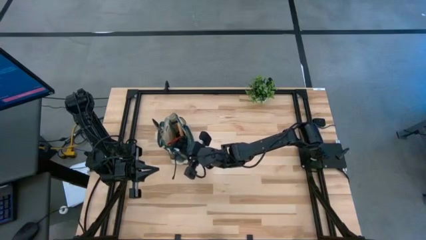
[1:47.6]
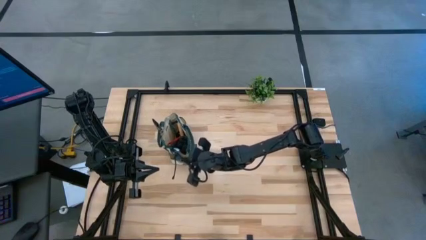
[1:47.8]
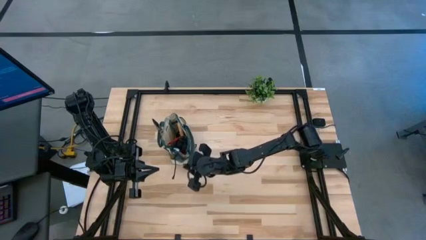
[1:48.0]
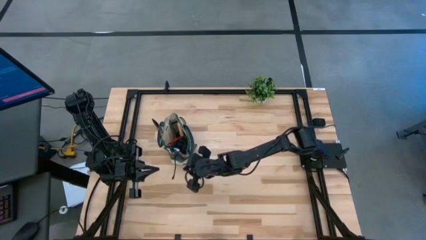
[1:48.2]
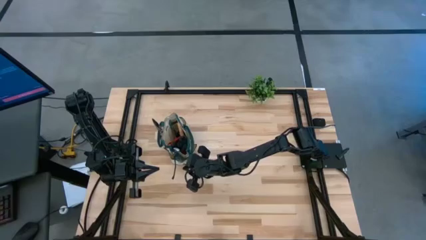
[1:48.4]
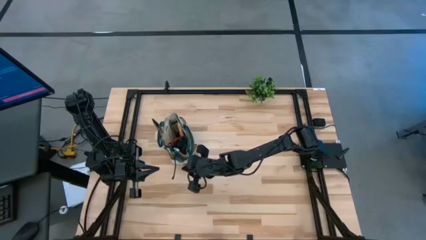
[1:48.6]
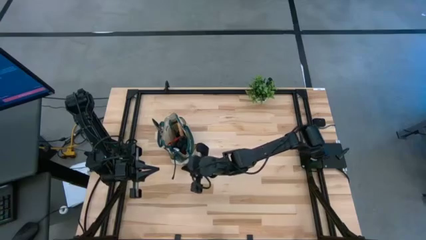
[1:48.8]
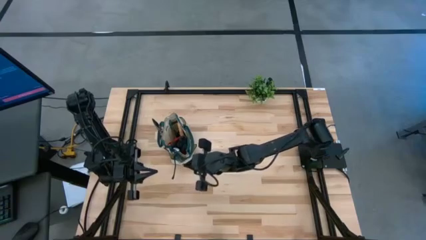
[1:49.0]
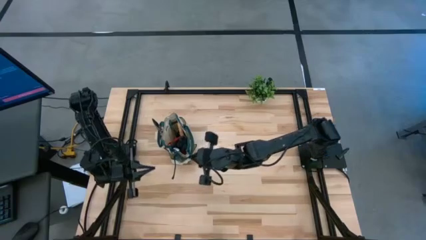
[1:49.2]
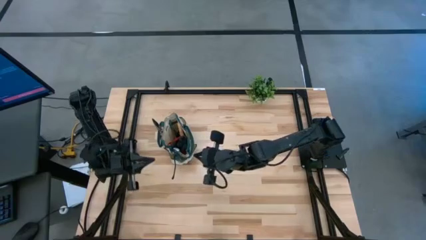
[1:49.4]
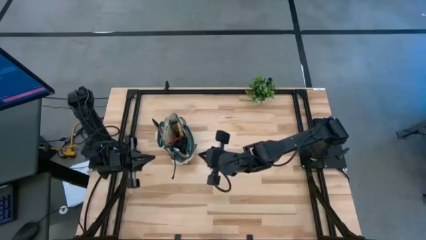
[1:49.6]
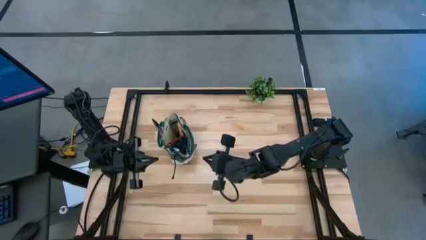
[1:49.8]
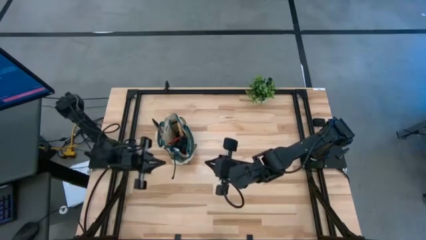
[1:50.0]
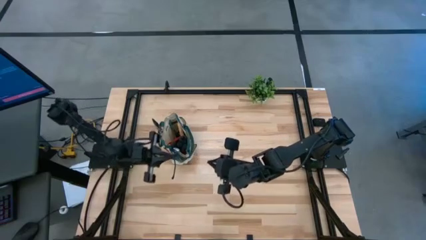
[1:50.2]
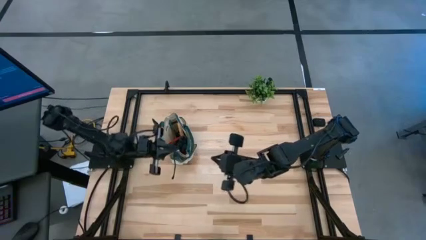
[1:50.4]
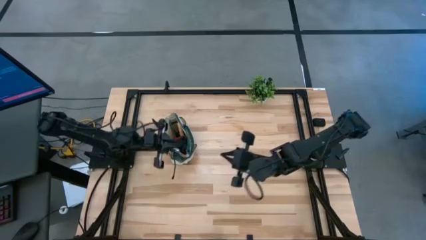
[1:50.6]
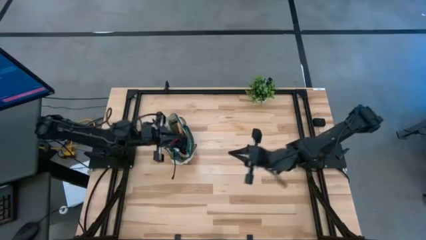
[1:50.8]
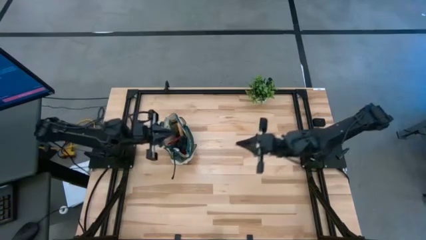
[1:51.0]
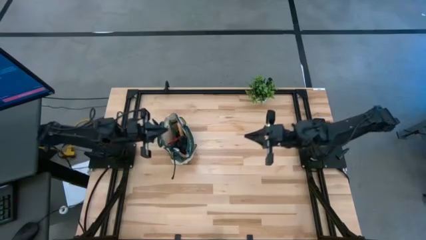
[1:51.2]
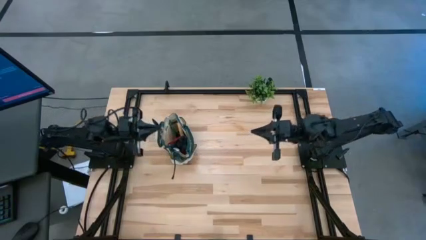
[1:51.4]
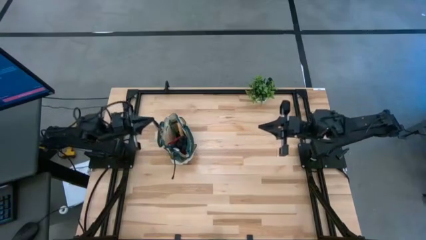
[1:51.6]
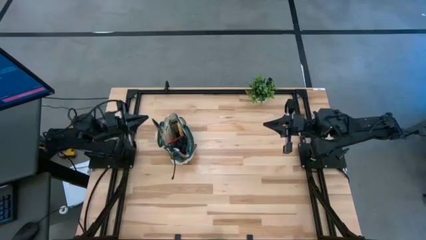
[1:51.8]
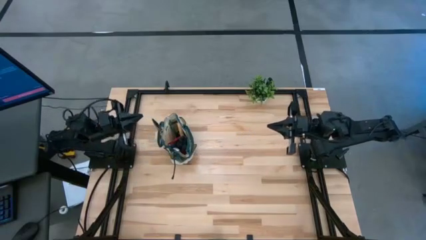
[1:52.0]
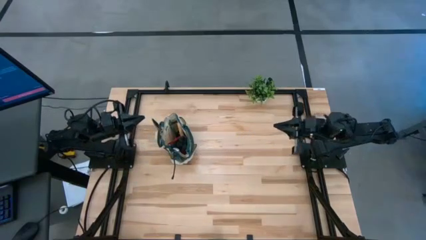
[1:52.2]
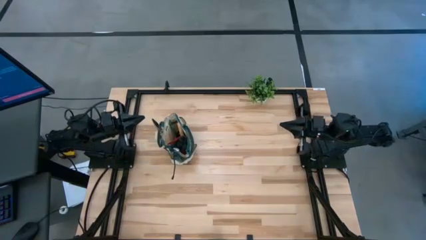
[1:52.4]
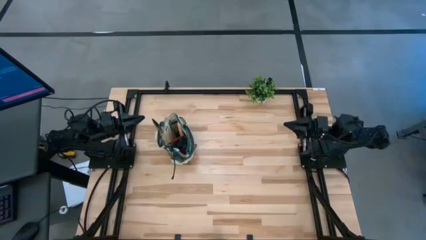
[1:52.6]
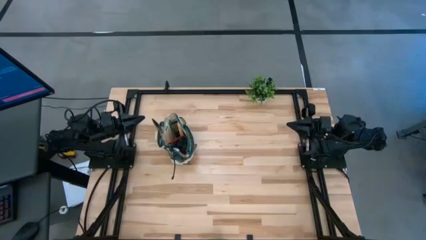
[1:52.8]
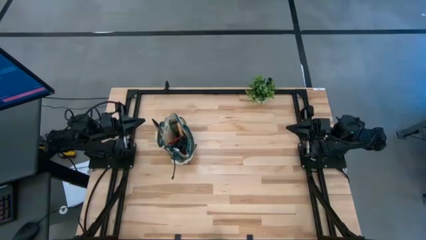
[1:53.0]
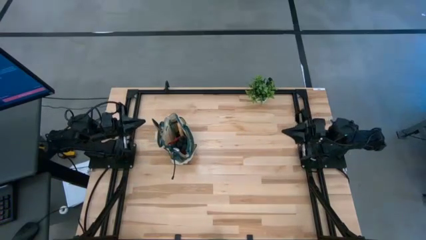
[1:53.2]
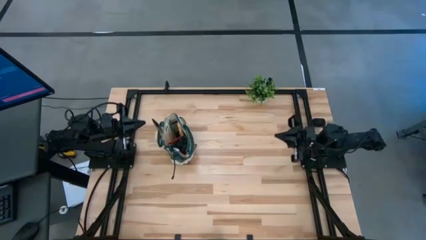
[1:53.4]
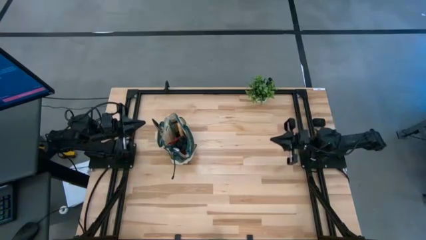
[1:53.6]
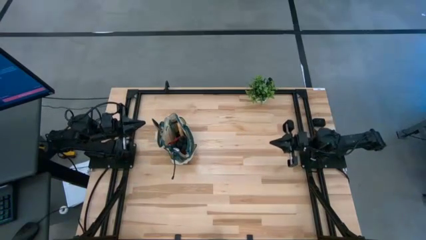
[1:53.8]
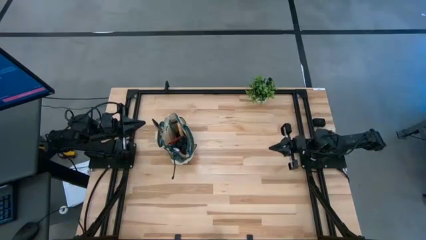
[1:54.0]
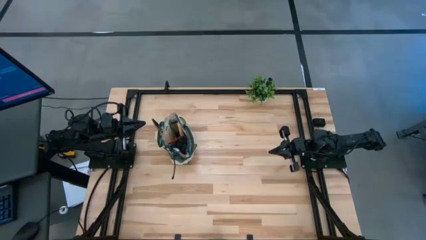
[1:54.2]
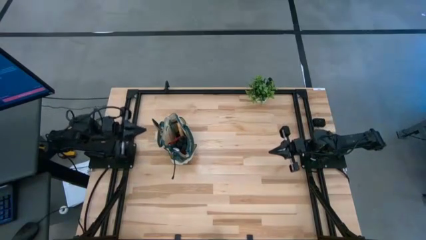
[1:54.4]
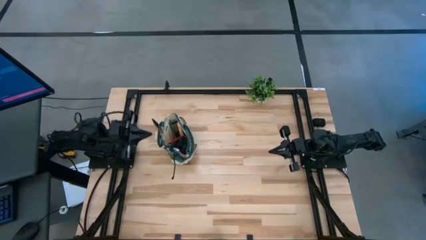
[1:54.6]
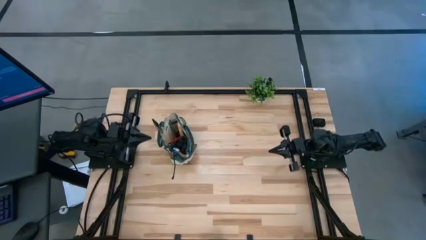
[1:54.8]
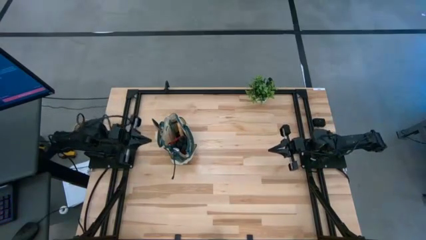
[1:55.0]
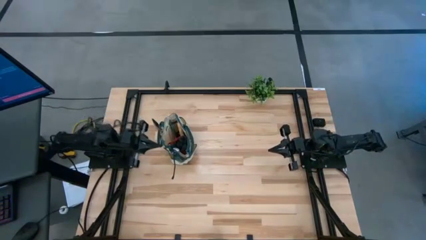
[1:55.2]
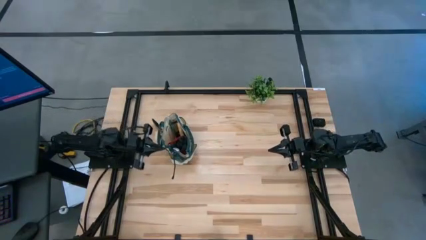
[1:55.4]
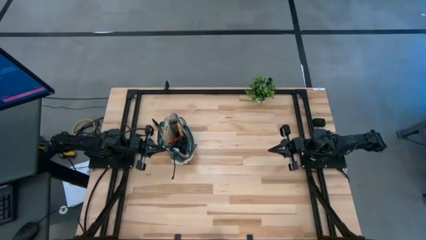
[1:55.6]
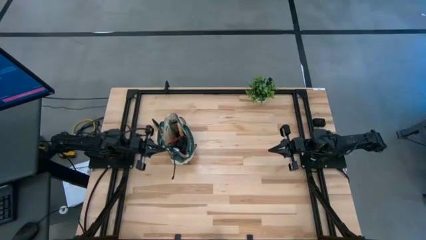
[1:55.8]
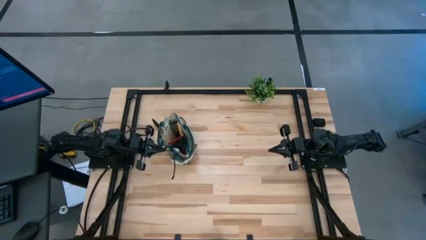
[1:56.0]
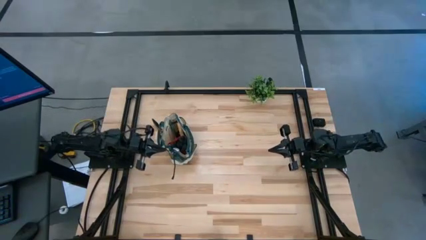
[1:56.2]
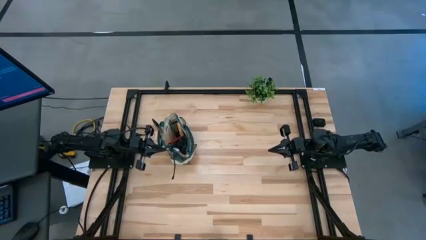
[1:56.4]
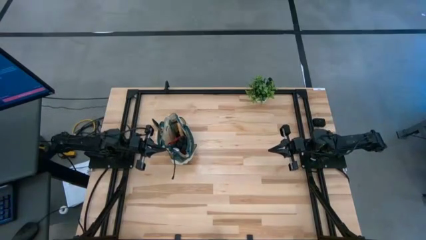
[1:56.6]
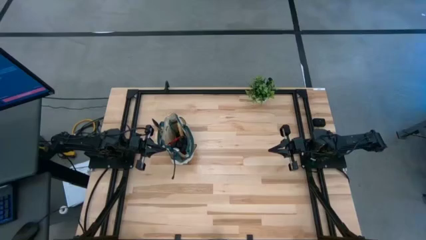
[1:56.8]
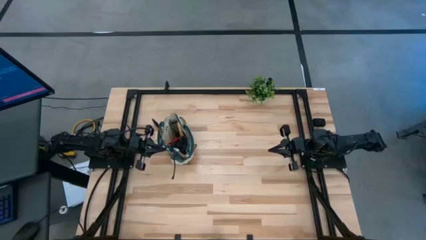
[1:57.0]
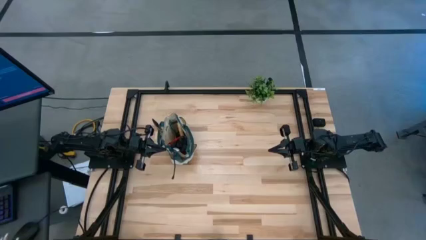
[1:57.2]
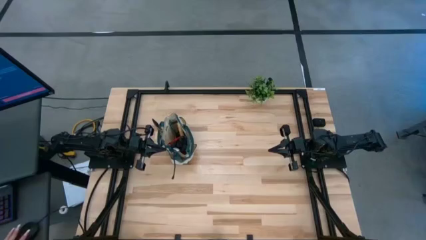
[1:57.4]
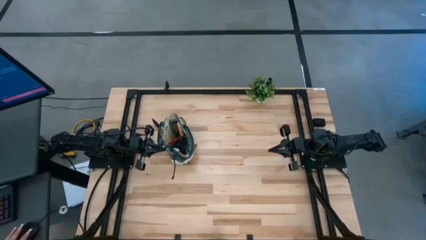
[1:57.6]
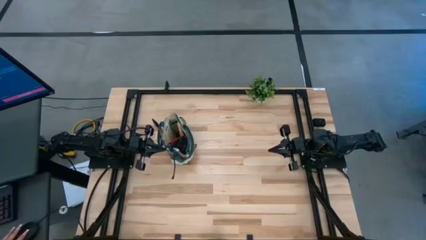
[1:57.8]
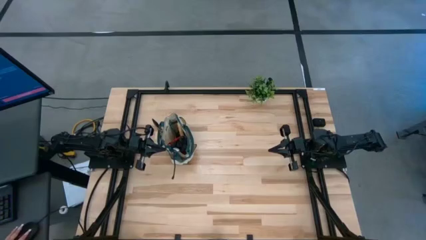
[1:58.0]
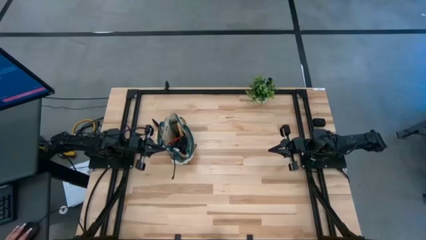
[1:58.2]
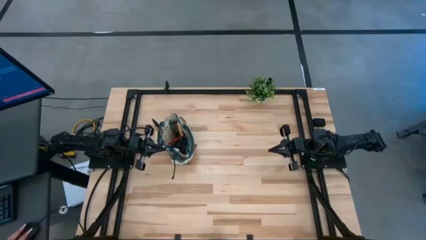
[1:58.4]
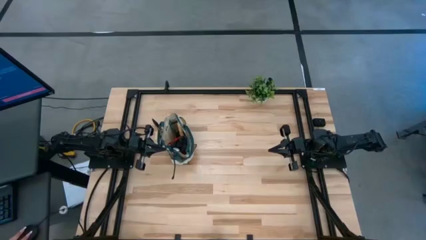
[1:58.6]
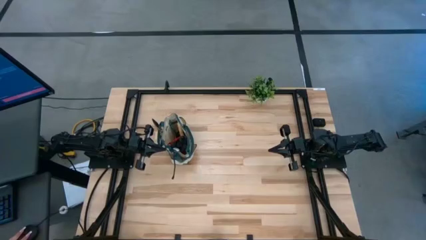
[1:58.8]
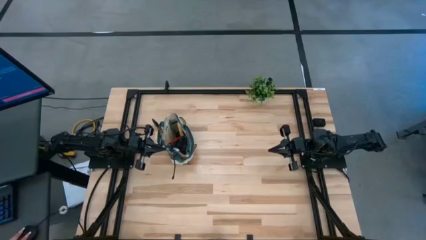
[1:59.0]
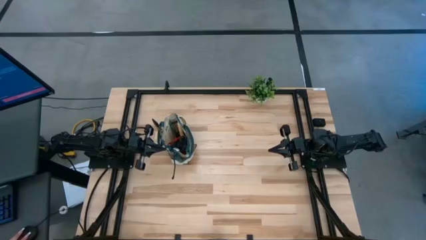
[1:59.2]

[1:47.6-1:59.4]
Task: Pick & Place Garden tools in Gardening bag
Return to Home Position

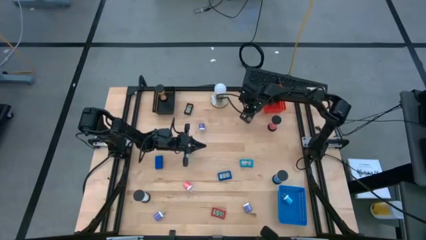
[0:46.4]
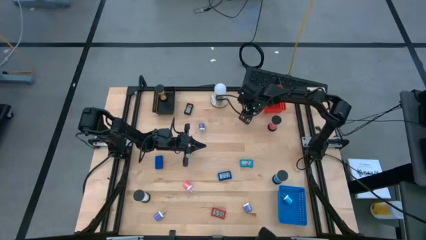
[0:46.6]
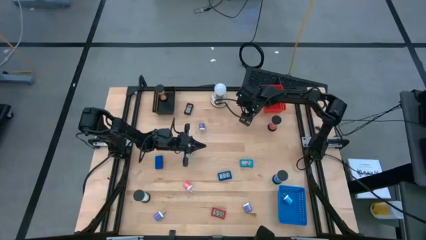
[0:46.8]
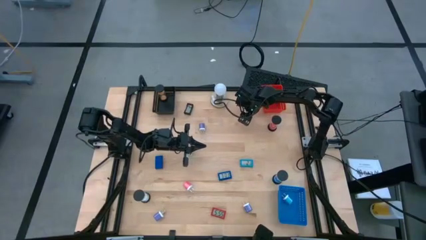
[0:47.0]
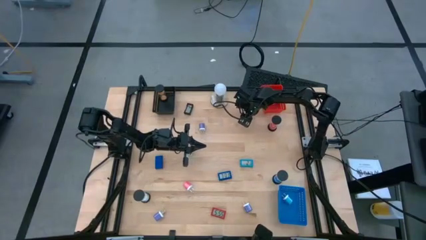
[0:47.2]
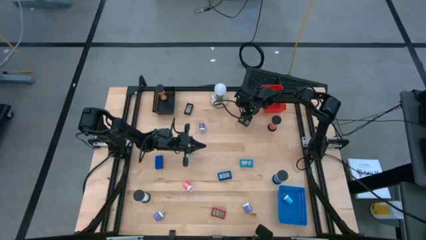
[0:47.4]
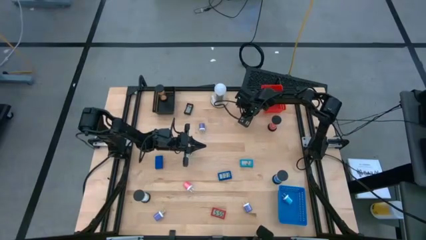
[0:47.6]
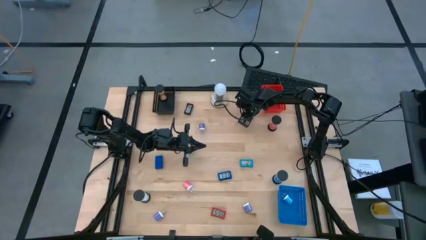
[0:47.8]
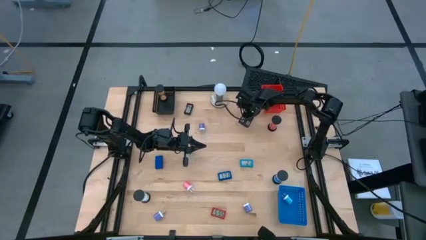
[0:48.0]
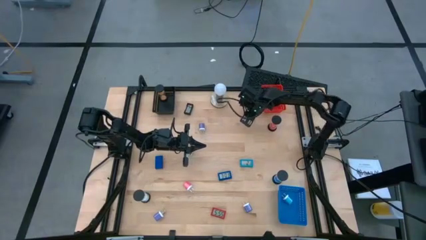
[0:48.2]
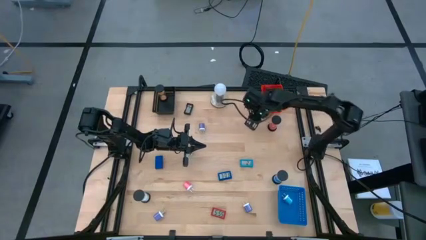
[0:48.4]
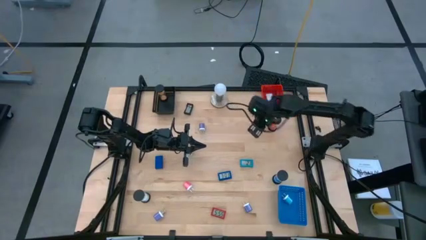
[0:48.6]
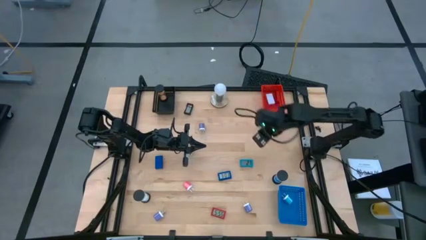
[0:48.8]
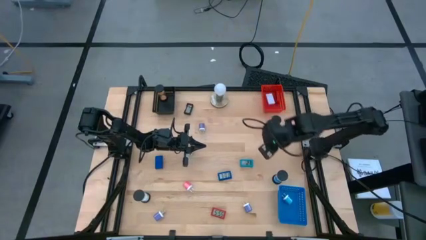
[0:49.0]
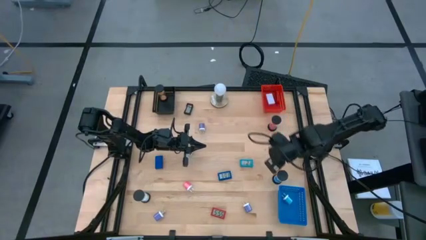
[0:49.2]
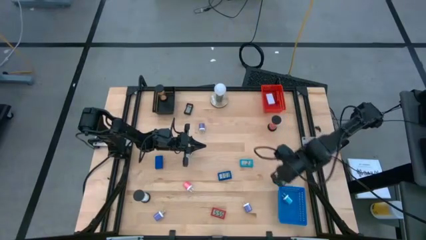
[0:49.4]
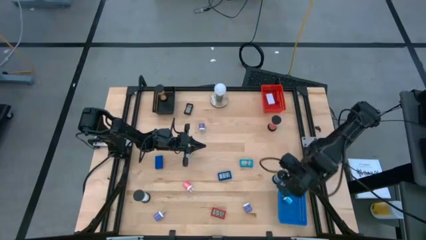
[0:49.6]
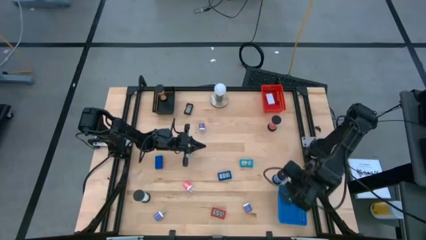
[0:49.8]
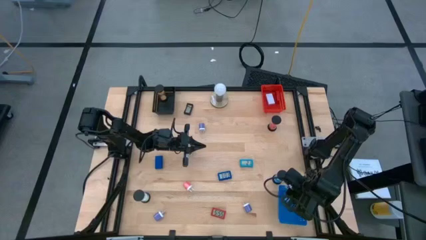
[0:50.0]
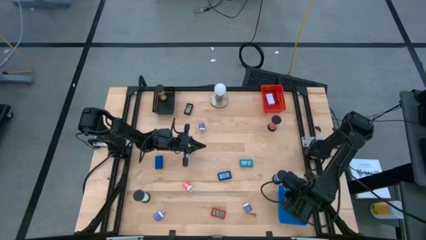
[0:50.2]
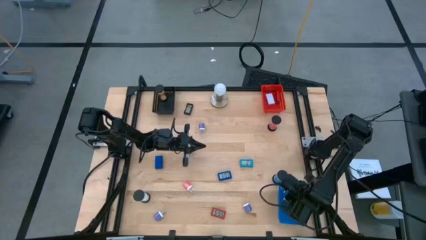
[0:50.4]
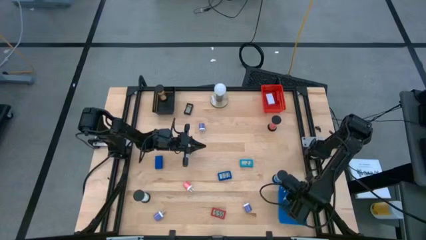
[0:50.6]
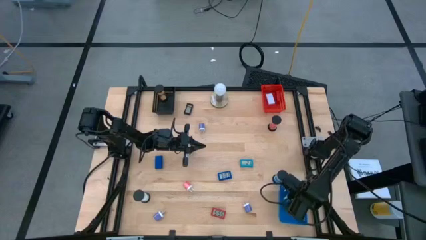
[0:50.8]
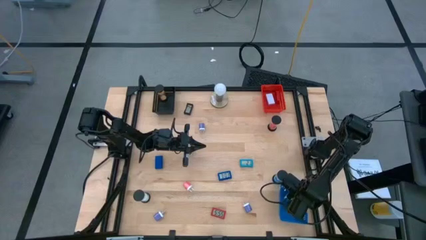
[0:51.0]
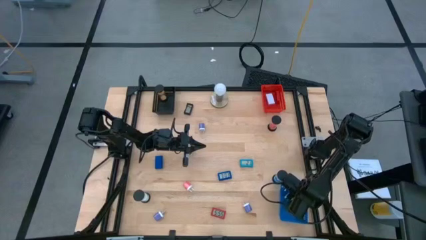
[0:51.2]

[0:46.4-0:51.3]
Task: Pick & Place Office items
Put the top green charger adapter into the blue bin
